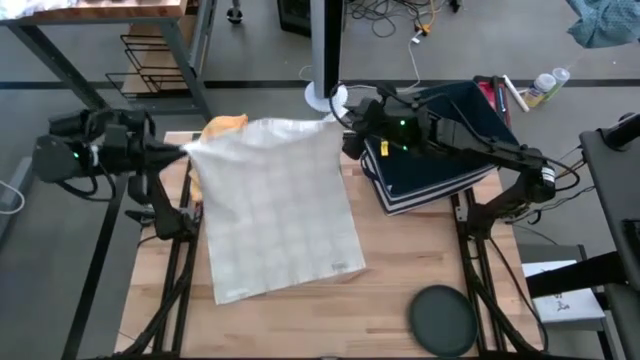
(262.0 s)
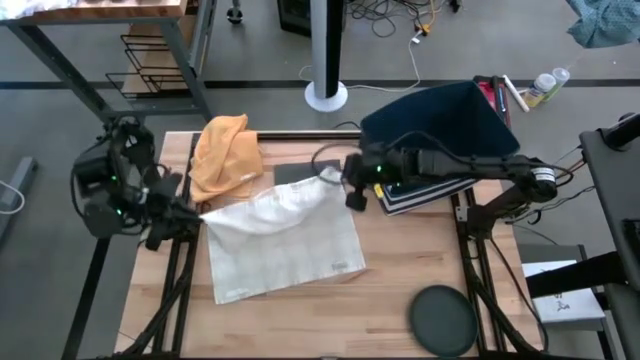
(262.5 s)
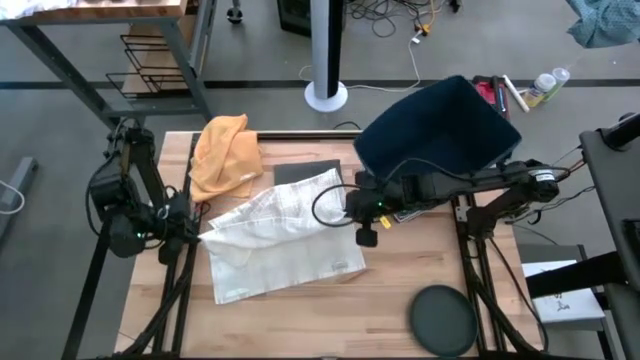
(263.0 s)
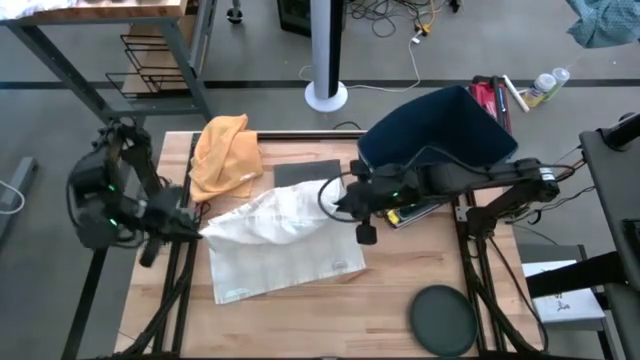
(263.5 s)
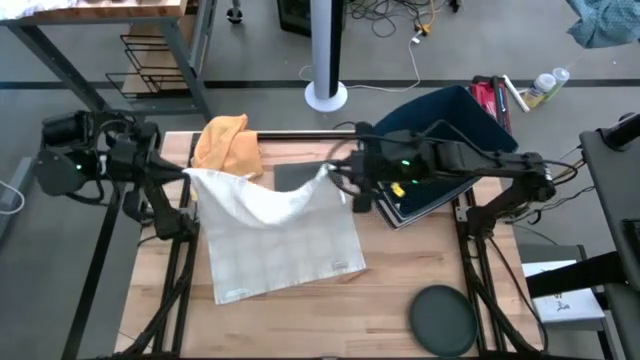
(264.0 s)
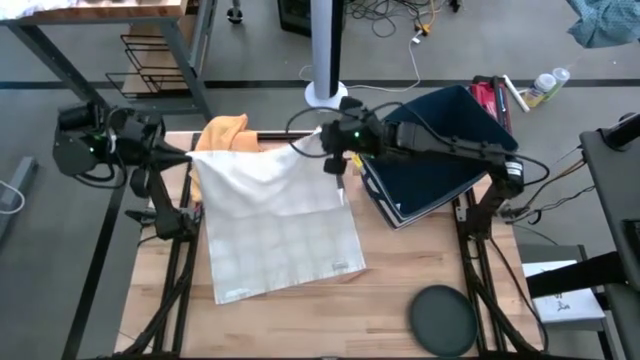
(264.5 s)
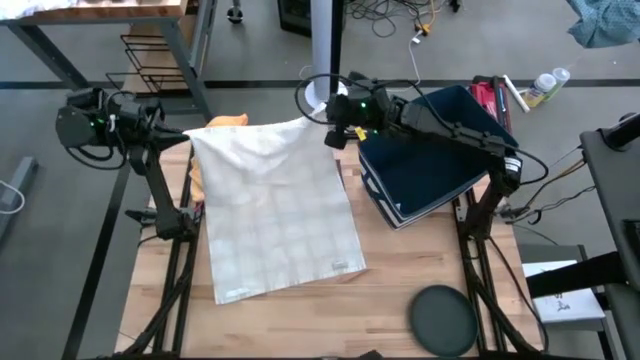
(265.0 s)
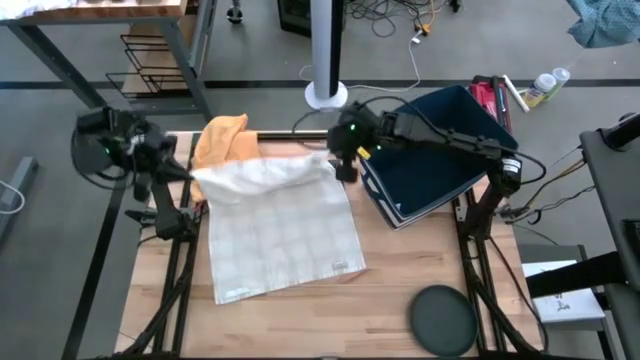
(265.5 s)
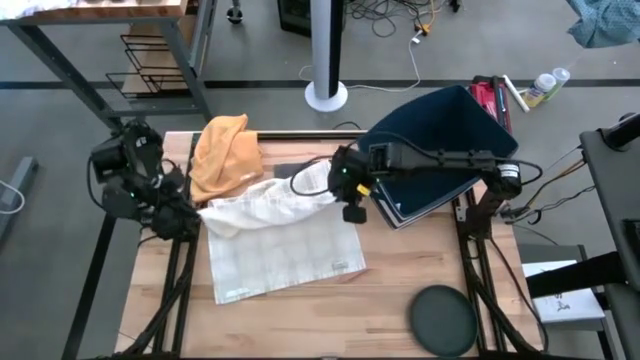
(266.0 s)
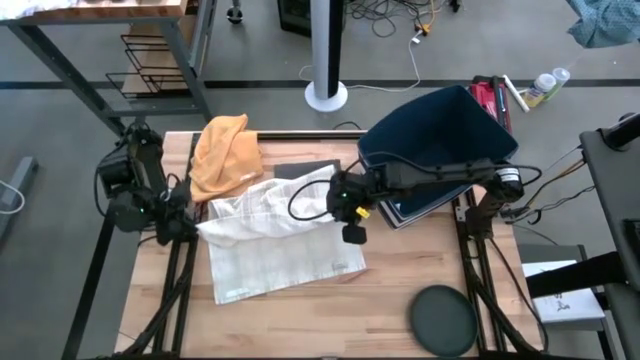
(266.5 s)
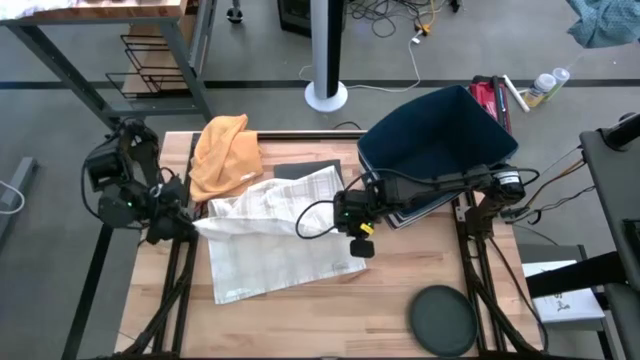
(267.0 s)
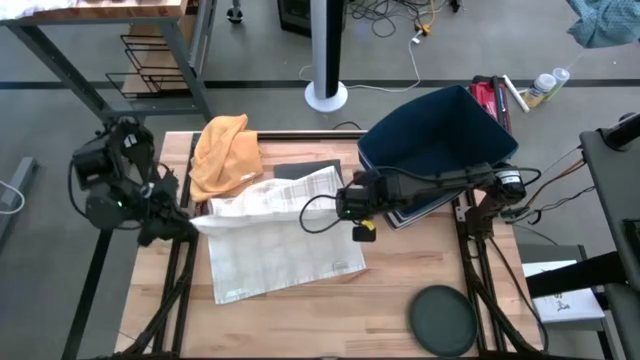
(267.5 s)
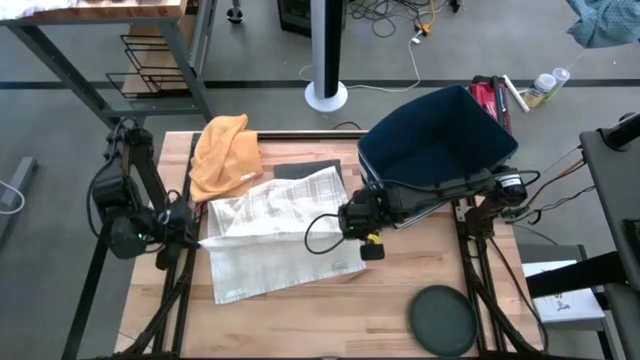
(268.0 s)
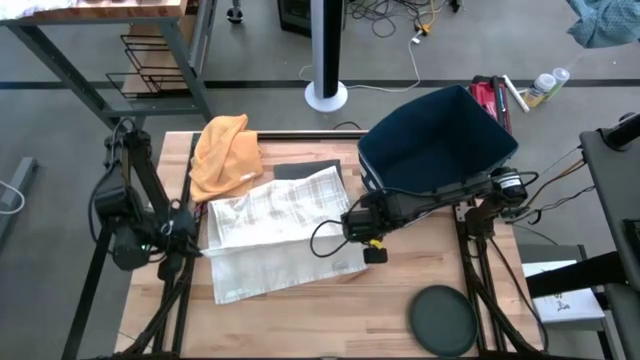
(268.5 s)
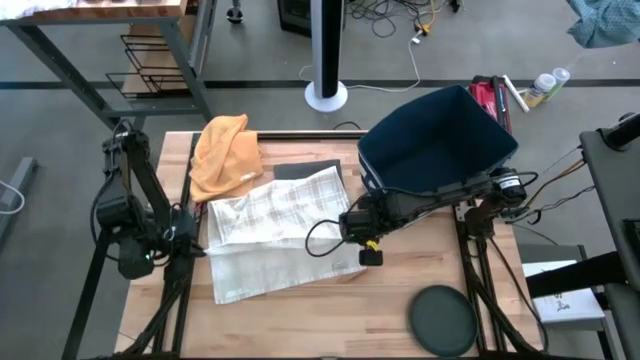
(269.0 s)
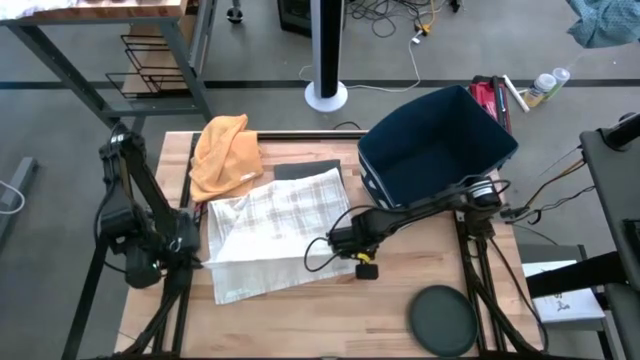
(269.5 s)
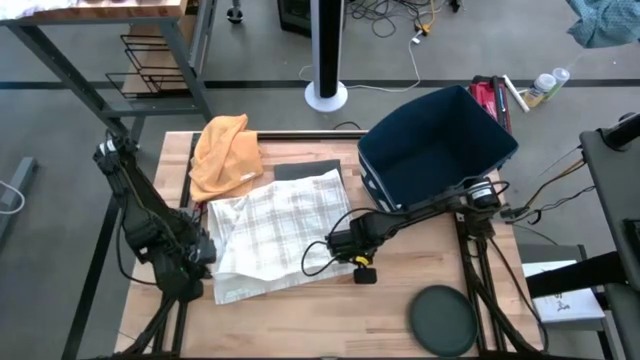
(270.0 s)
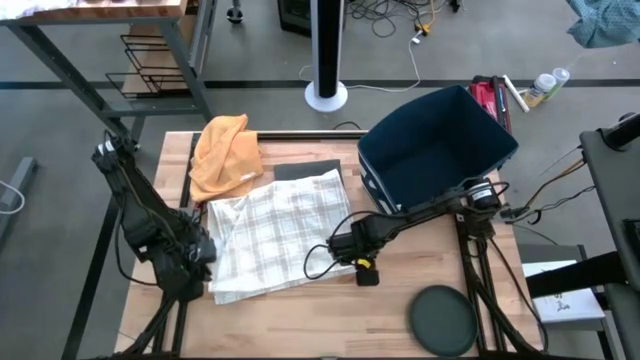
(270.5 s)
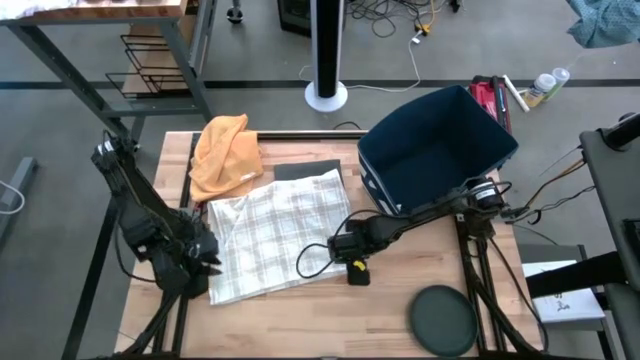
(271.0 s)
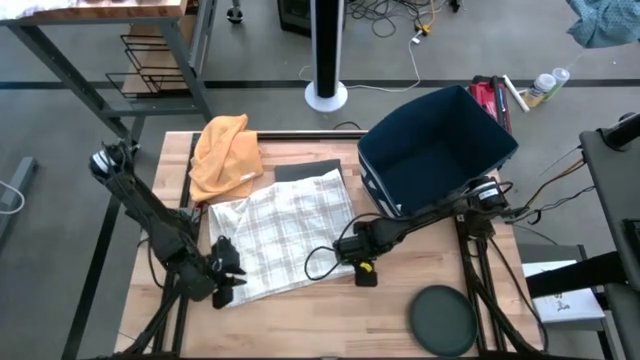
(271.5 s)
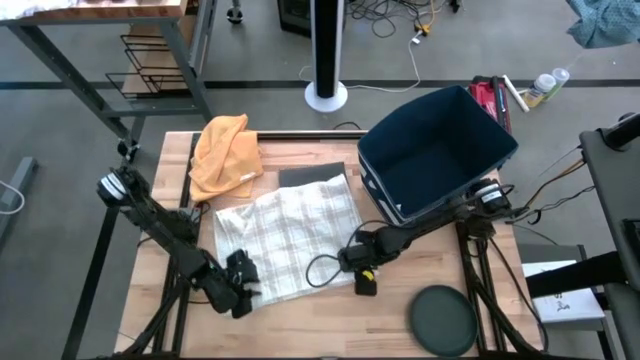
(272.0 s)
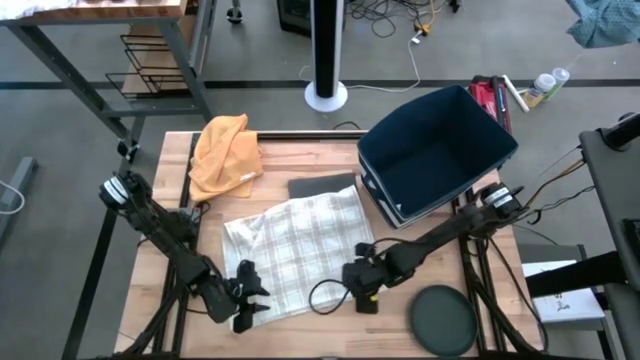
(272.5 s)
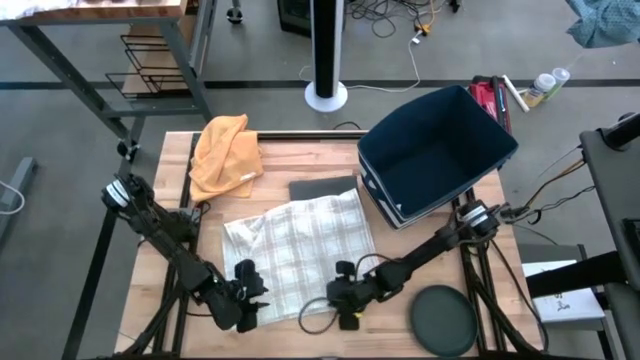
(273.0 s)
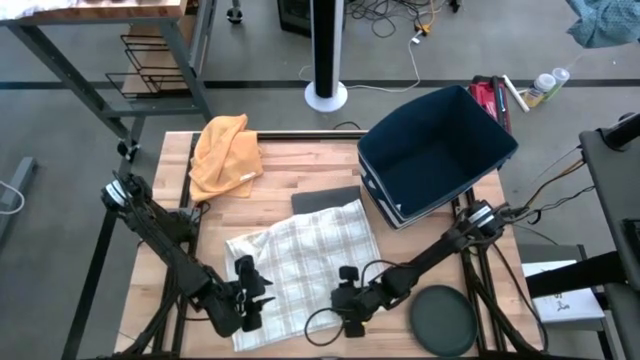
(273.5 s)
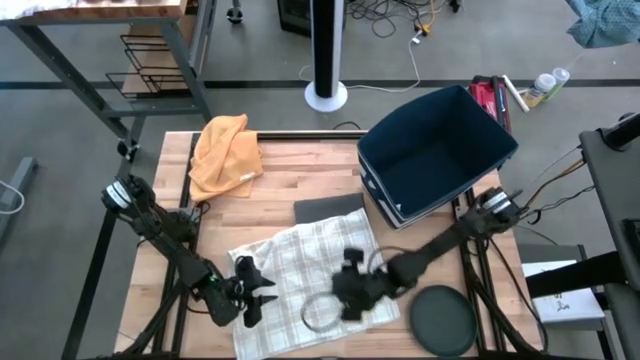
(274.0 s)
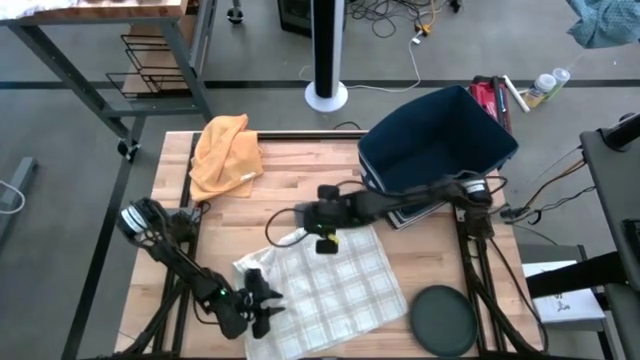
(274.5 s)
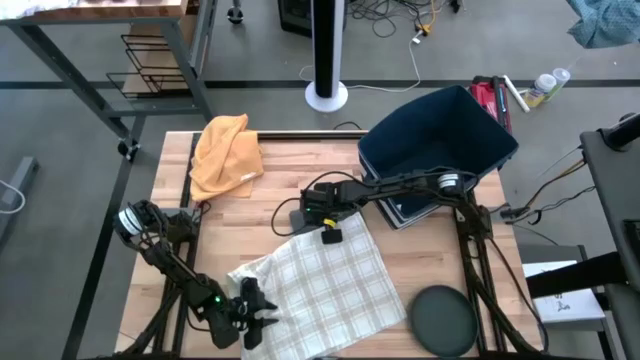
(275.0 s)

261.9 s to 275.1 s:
Task: Fold kitchen towel into neat rectangle
Fold the white patterned towel

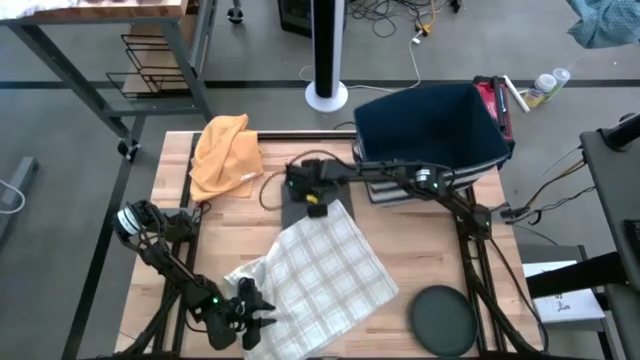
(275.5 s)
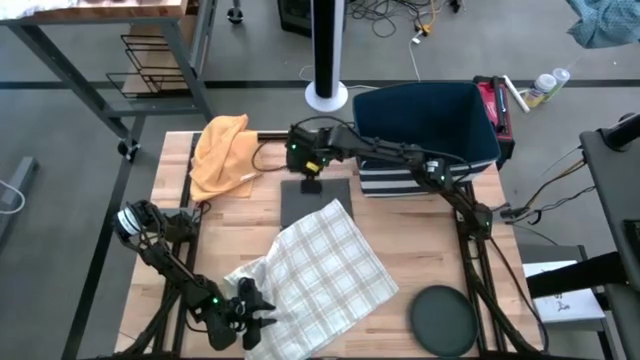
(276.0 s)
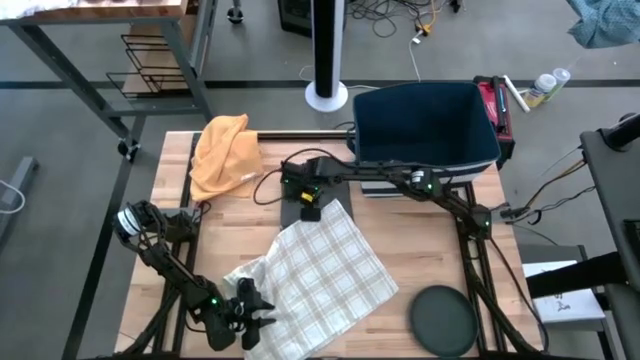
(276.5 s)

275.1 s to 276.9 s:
Fold the white patterned towel

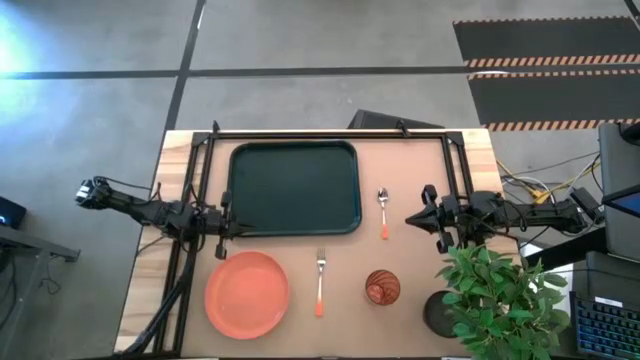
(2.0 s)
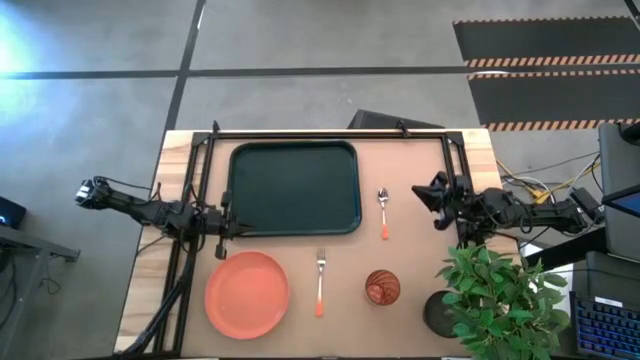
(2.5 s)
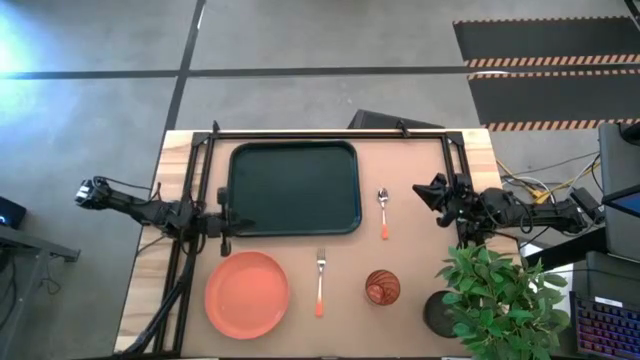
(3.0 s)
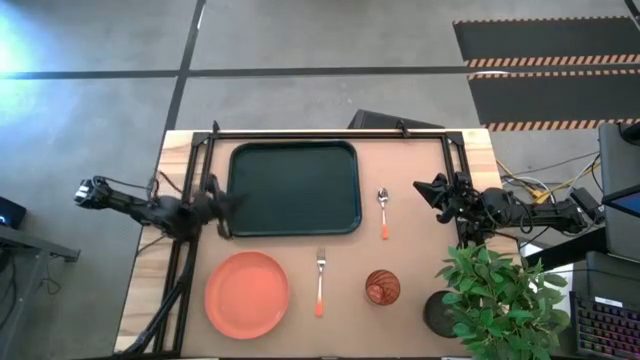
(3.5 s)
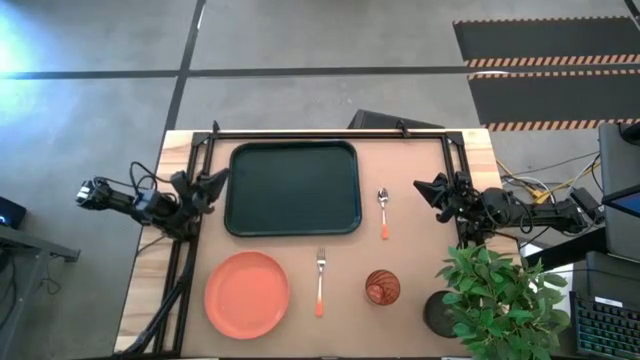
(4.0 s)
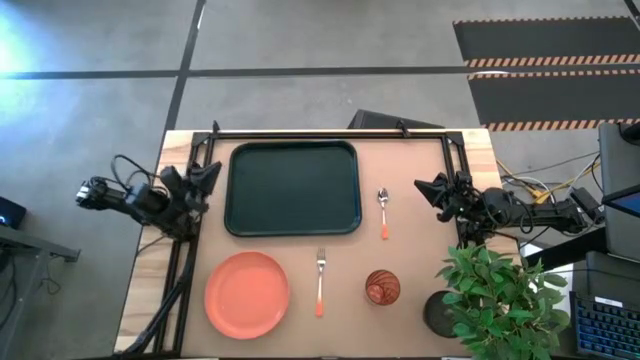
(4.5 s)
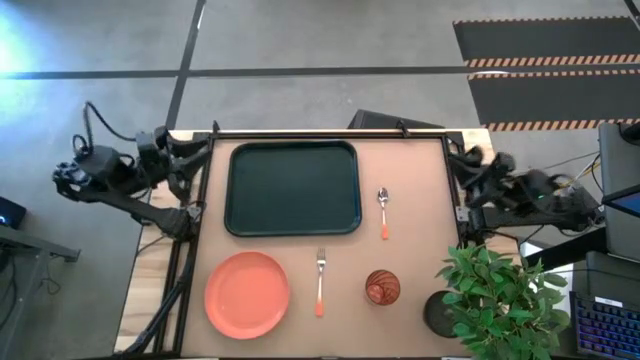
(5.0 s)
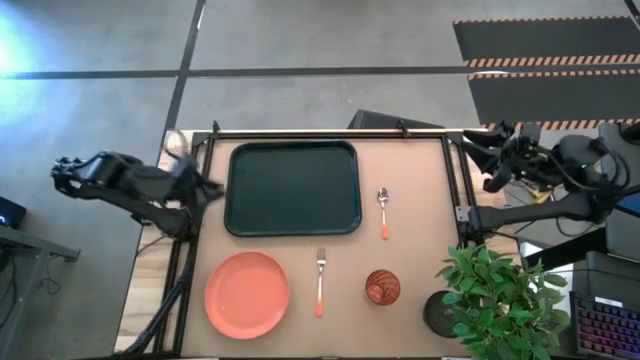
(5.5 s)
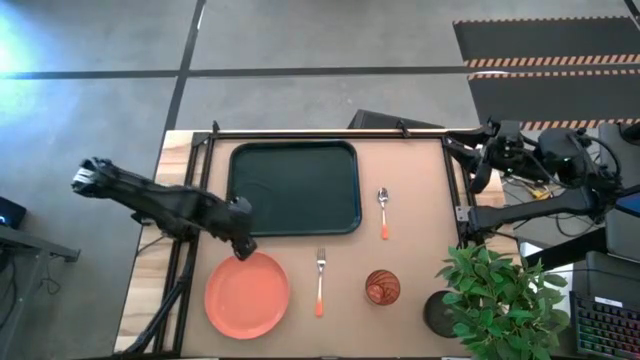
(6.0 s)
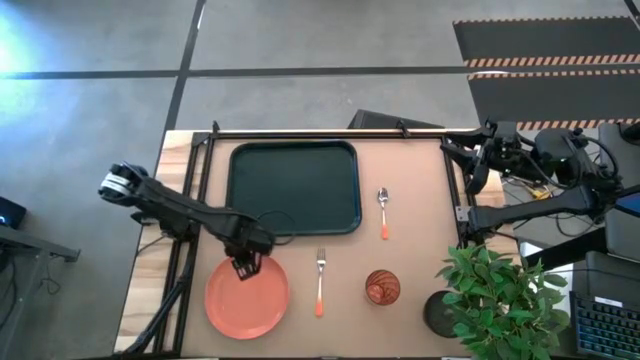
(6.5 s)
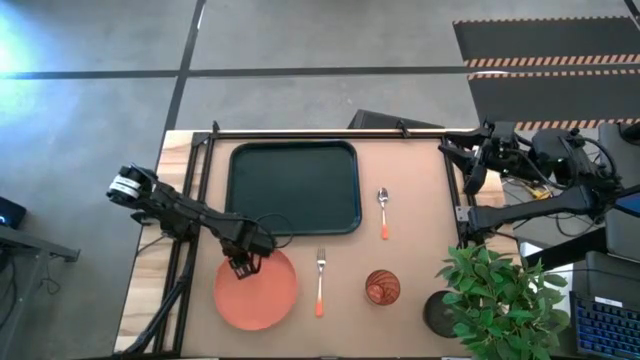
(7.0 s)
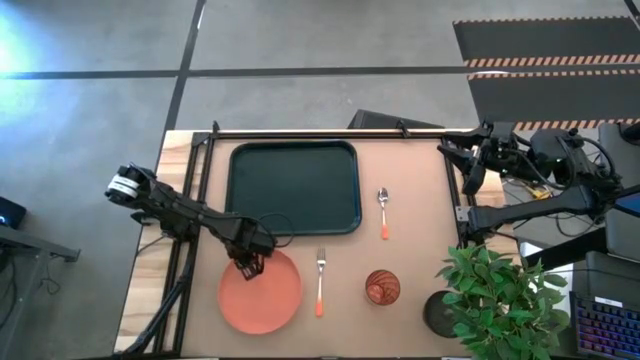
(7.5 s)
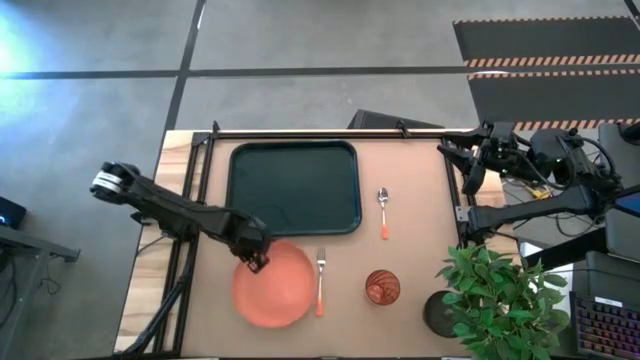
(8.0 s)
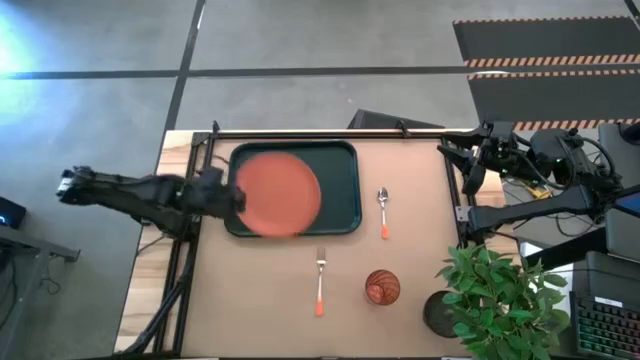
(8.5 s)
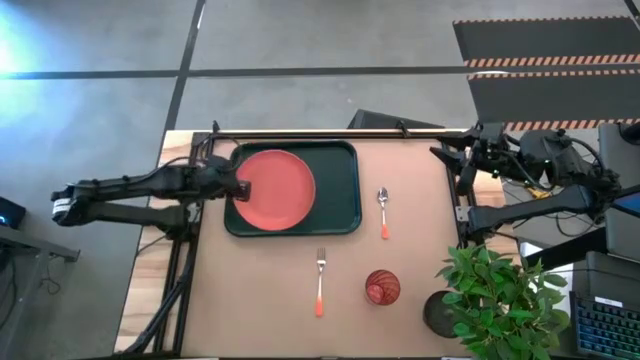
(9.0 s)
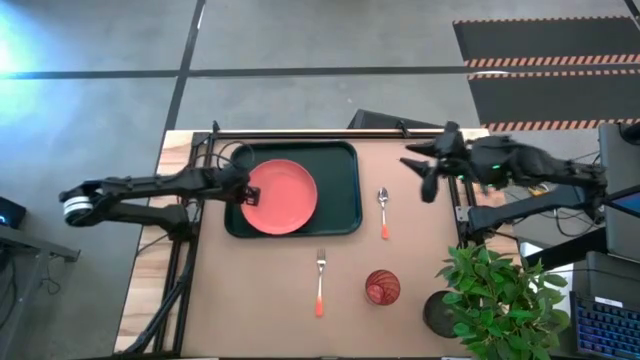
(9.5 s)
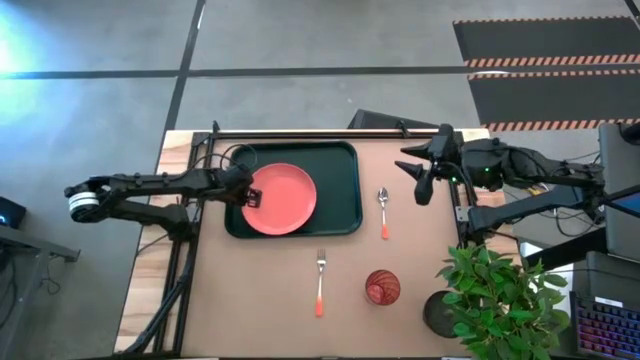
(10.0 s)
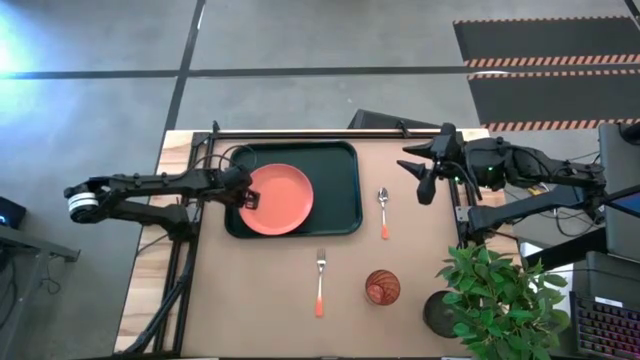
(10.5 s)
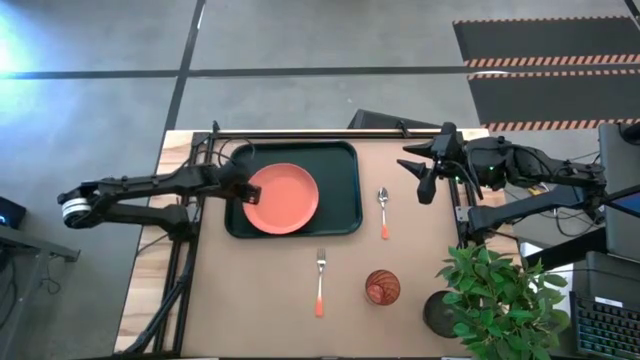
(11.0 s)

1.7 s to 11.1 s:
Task: Pick and place plate/cup/fork/spoon on tray
Put the orange plate on the black tray
